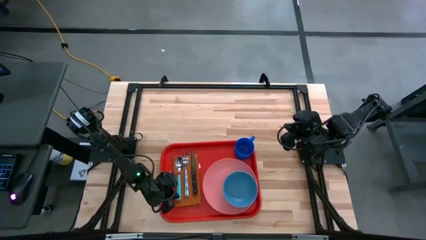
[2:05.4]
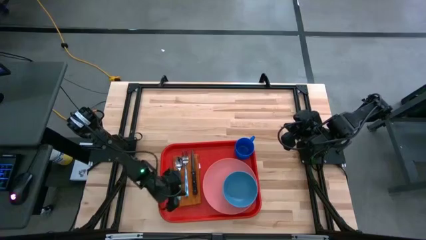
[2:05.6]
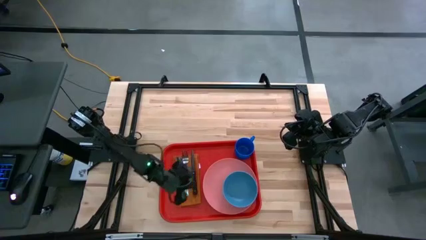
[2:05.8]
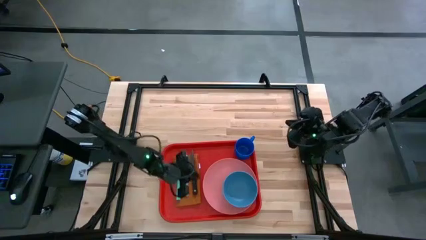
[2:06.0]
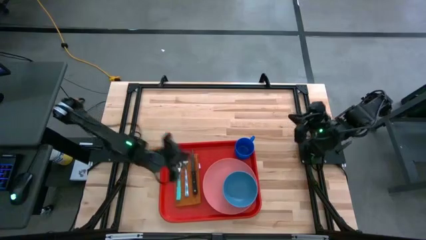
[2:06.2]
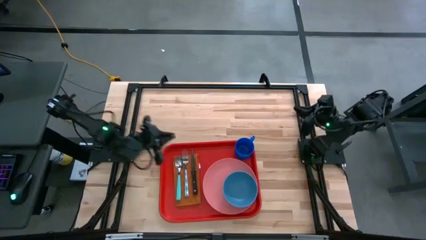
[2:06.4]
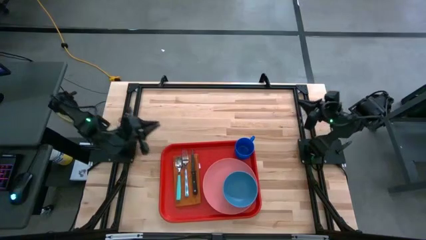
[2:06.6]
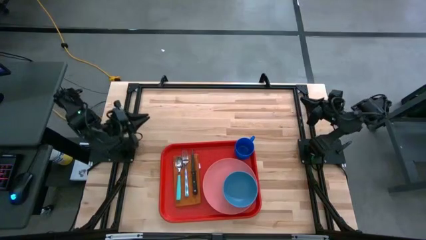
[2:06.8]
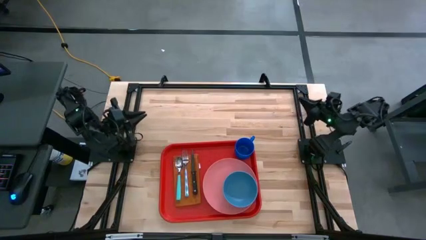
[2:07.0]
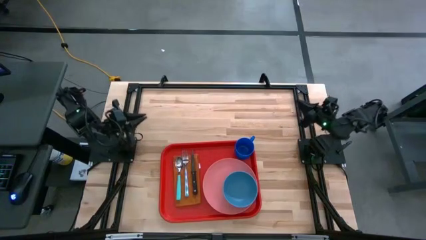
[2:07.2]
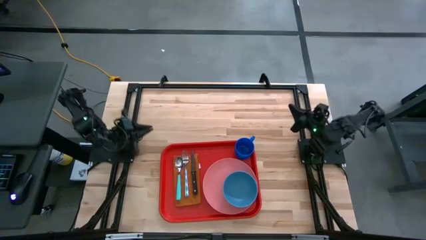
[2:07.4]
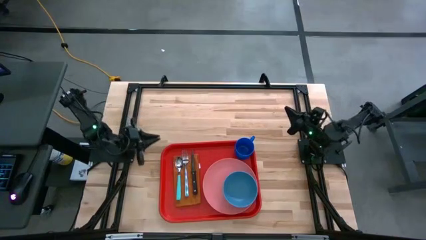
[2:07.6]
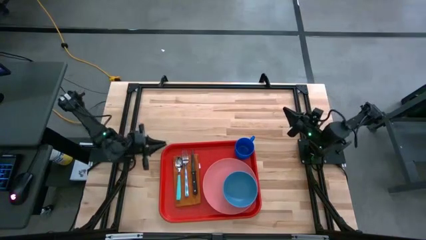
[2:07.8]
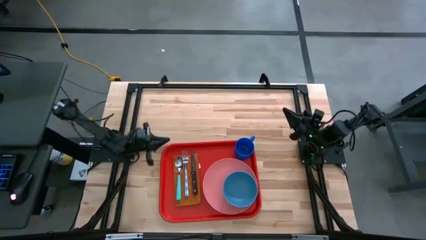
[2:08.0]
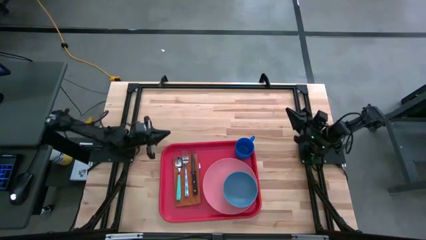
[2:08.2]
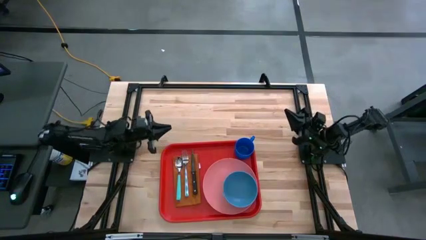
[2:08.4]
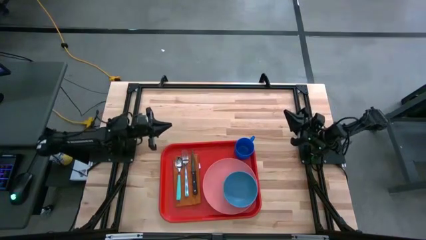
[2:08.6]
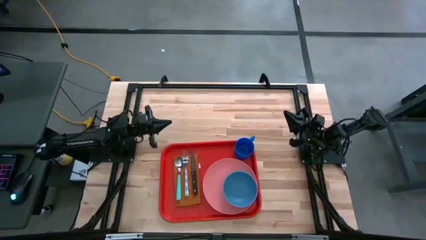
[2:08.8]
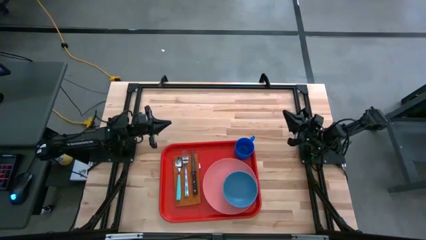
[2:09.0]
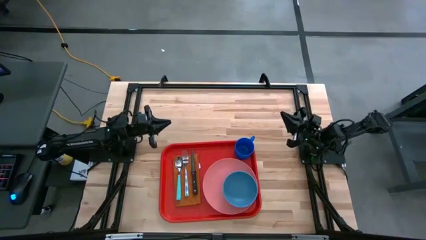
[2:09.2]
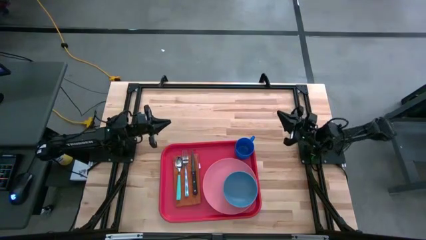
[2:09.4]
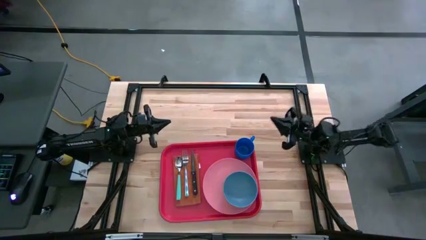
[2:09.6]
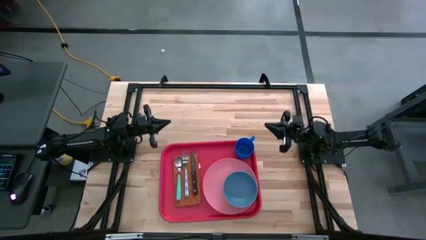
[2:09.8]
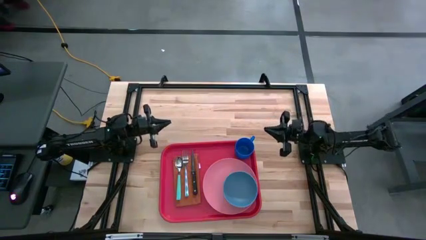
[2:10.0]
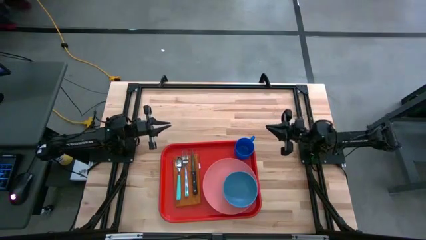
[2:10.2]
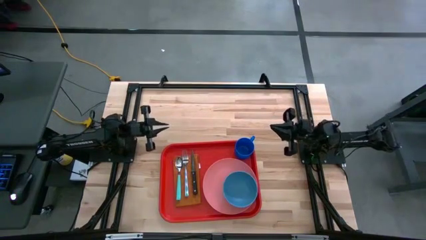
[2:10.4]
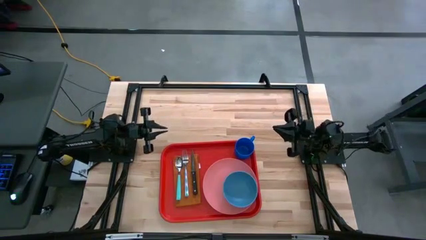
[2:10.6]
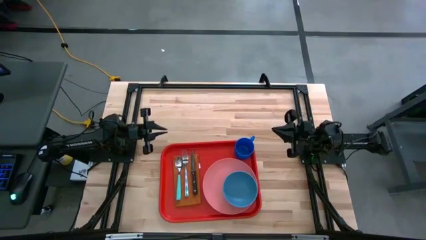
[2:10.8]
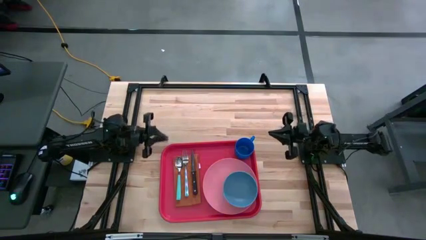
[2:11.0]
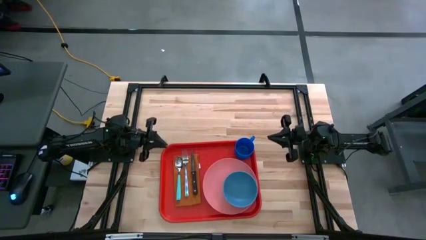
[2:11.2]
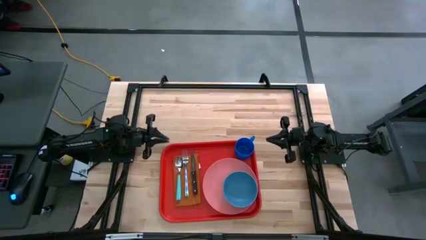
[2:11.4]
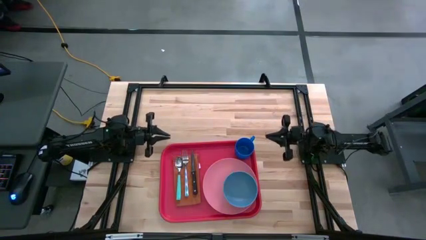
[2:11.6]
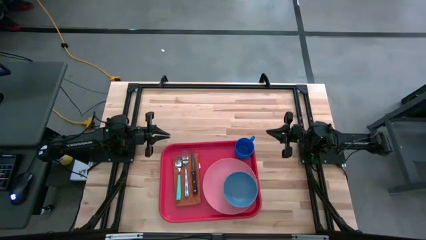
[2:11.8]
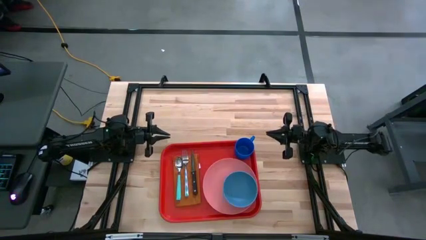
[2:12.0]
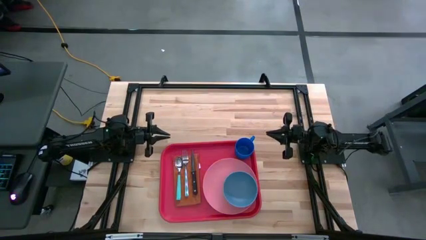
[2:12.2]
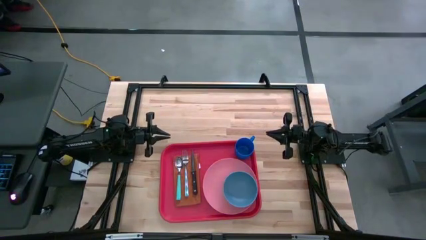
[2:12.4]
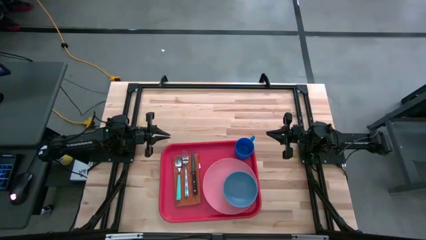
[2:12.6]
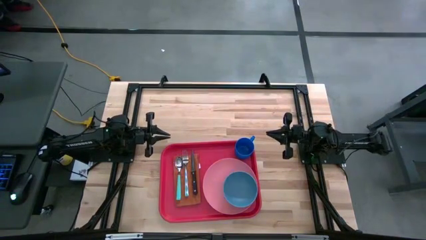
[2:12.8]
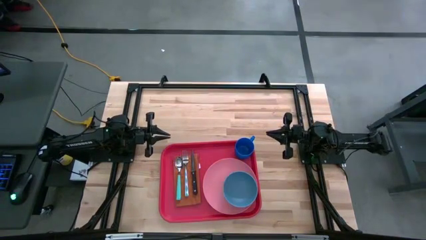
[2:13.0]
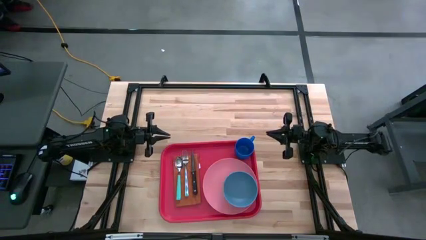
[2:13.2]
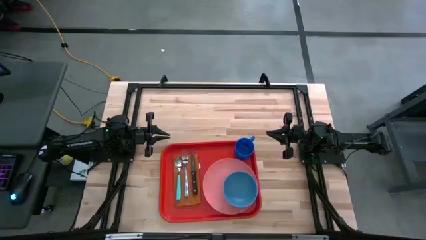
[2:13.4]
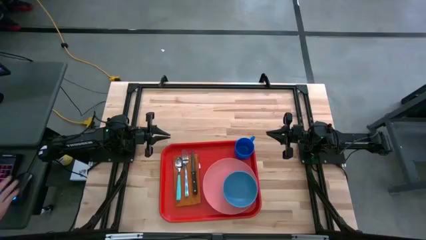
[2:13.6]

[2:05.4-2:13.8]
Task: Set up tray
Return to Home Position
